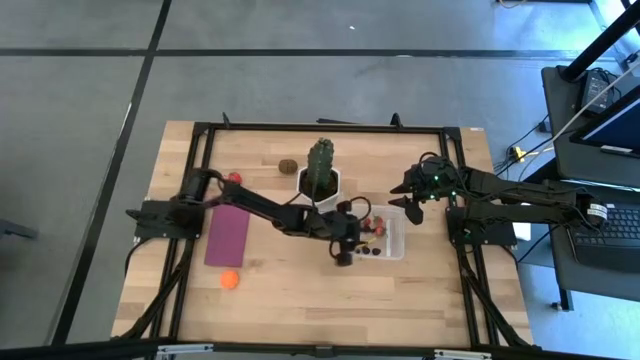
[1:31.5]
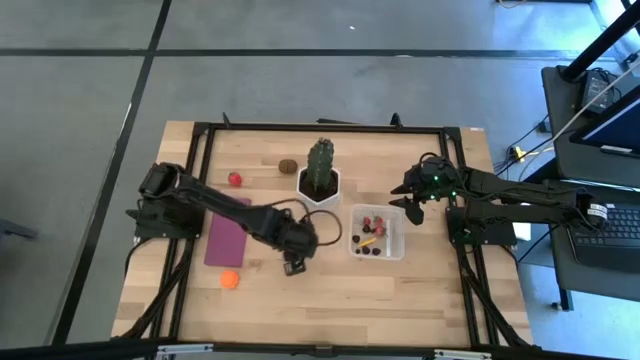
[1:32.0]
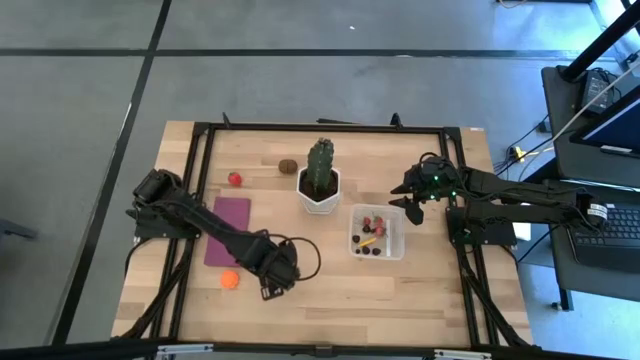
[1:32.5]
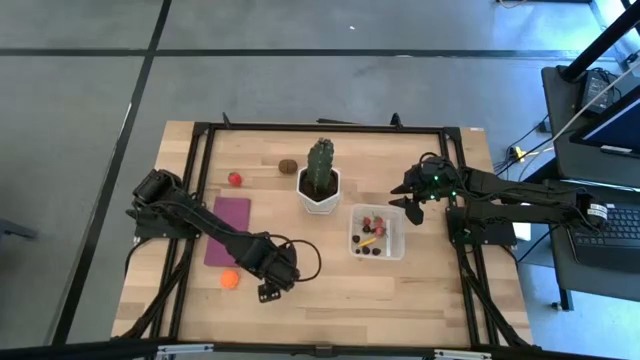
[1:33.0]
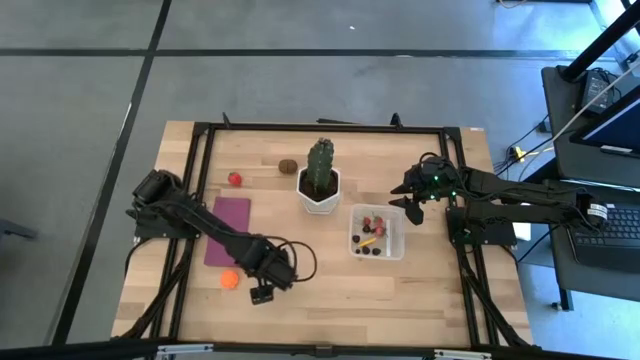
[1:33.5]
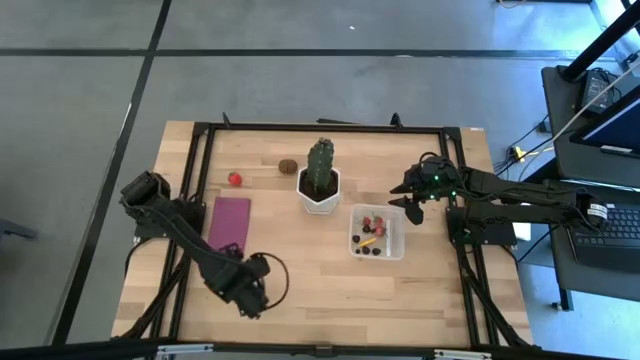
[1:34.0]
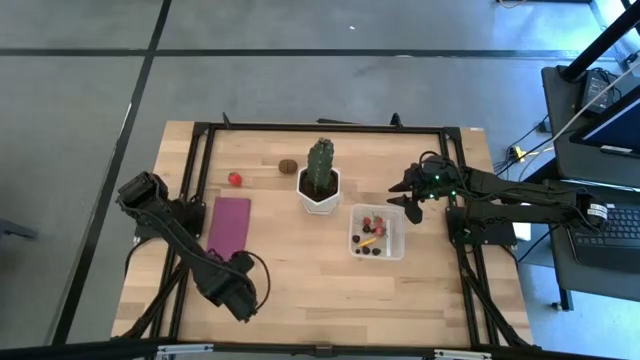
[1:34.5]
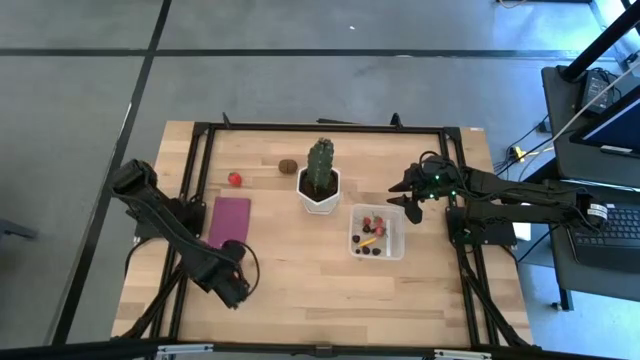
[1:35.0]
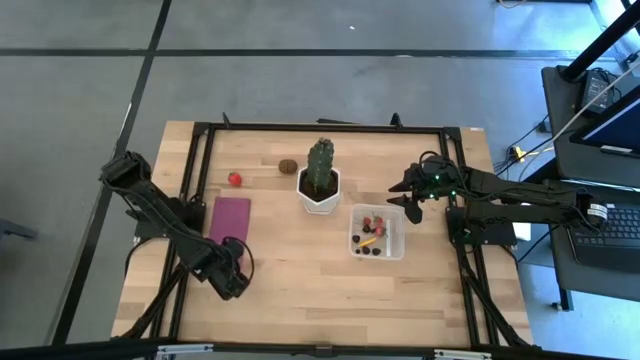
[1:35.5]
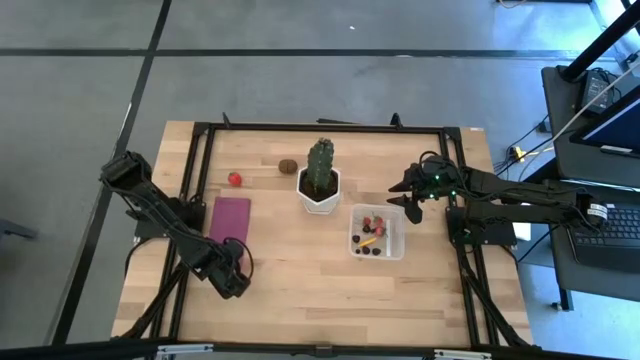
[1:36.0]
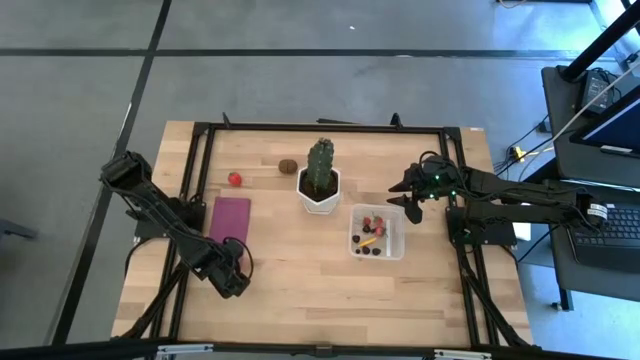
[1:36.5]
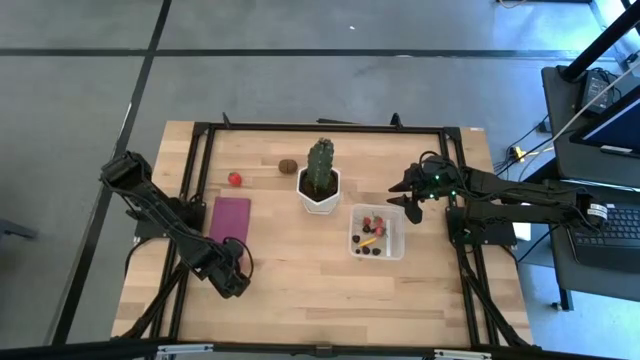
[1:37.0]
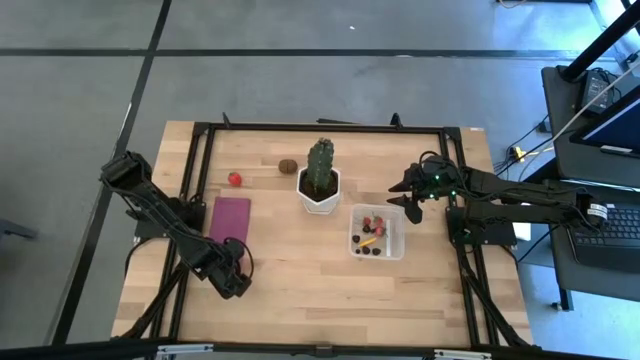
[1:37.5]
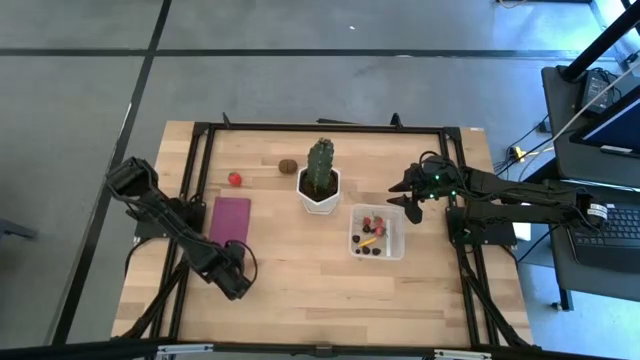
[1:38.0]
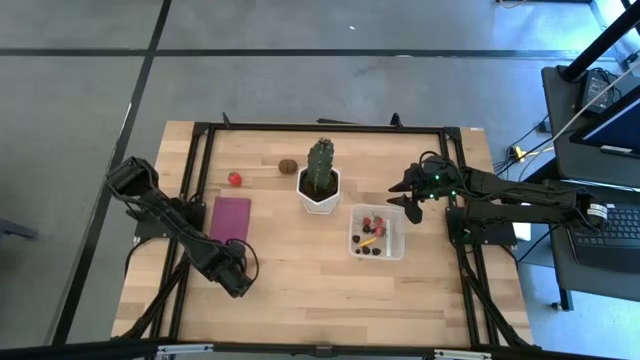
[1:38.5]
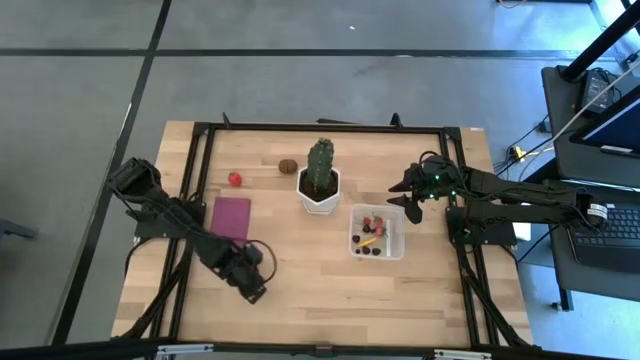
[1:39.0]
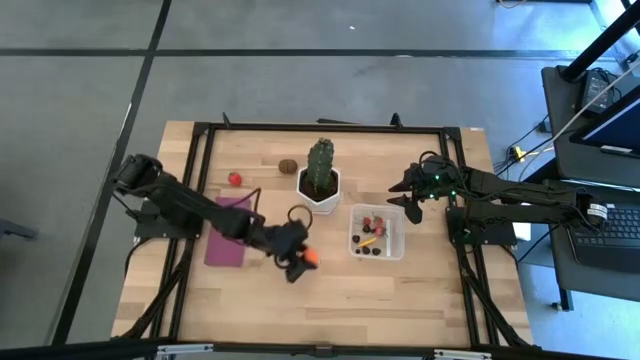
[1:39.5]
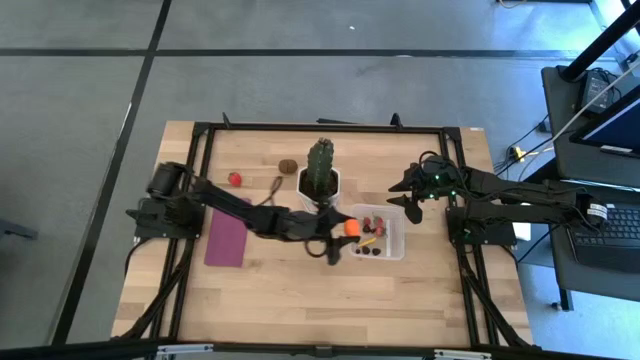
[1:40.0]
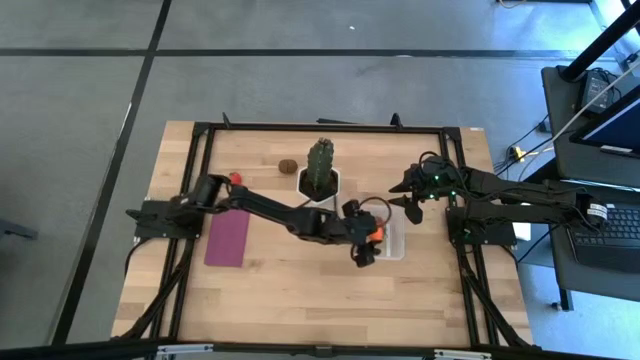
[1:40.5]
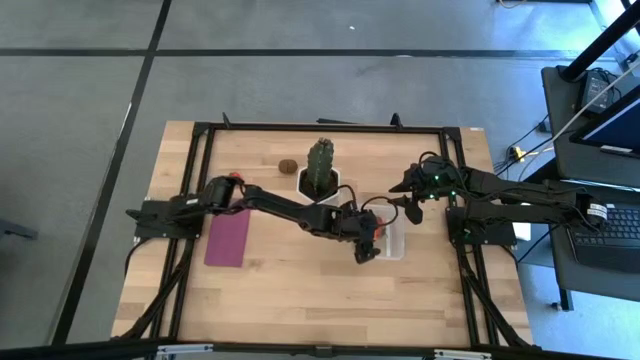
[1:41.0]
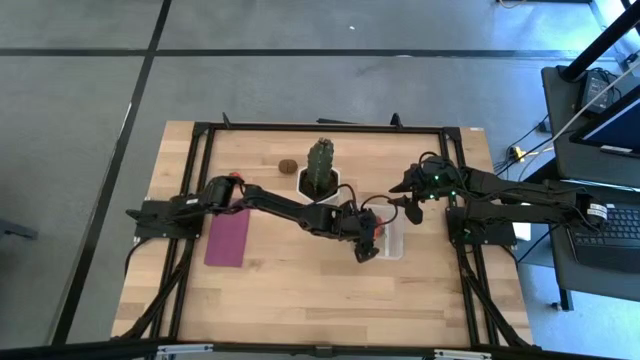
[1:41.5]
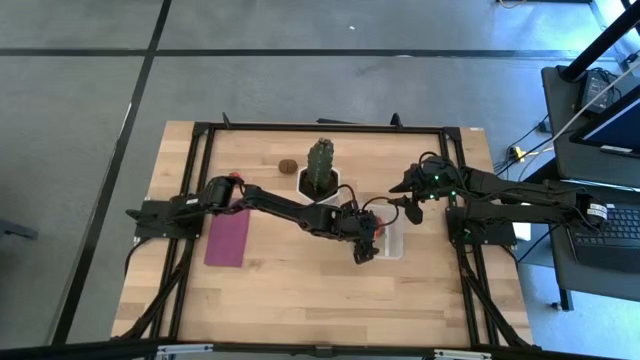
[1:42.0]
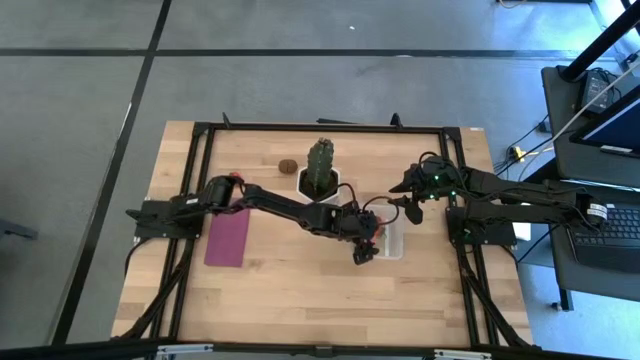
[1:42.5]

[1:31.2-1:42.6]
Task: Pick and placing Produce into tupperware
Put the pumpkin into the transparent bin

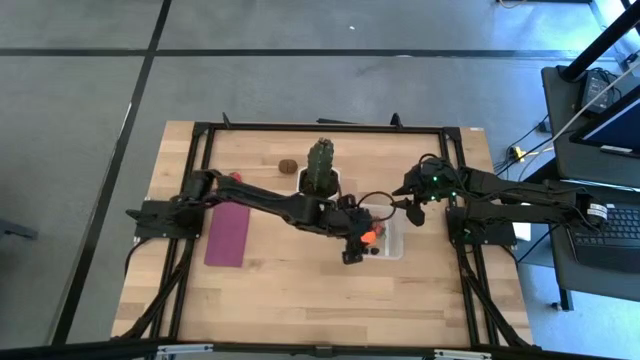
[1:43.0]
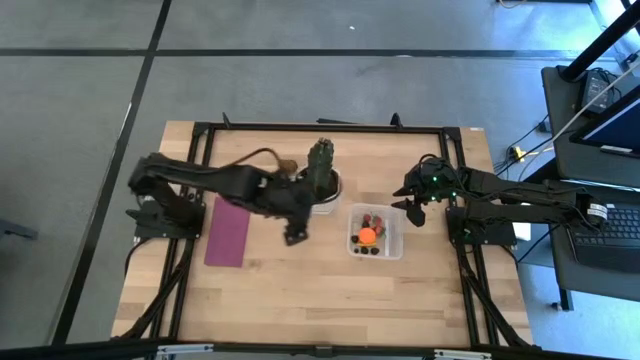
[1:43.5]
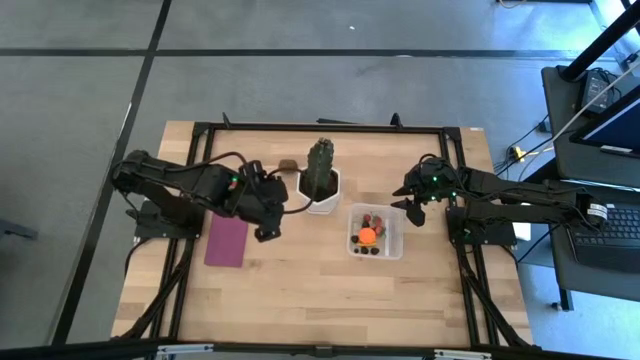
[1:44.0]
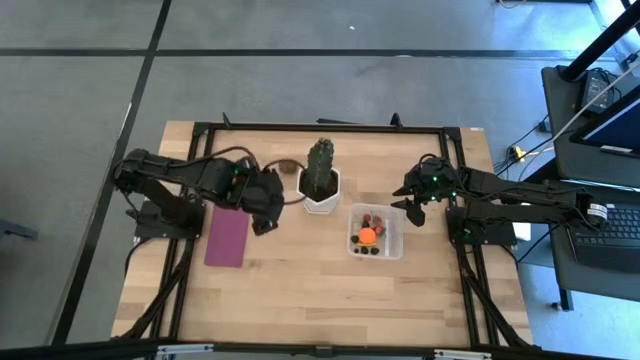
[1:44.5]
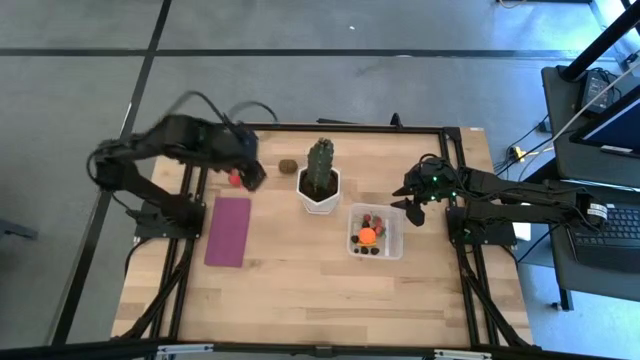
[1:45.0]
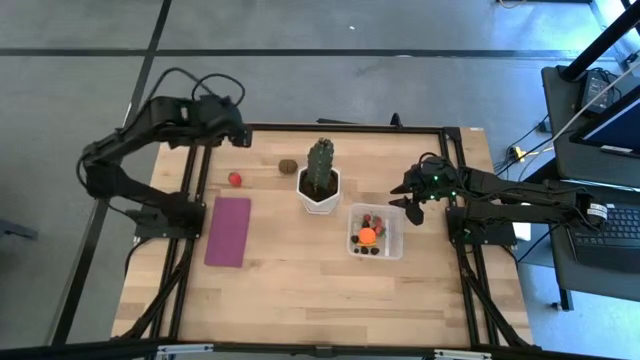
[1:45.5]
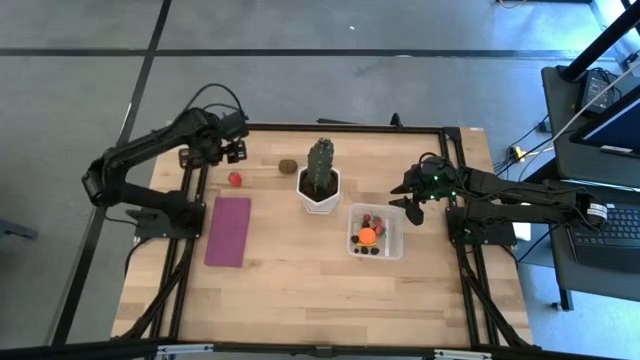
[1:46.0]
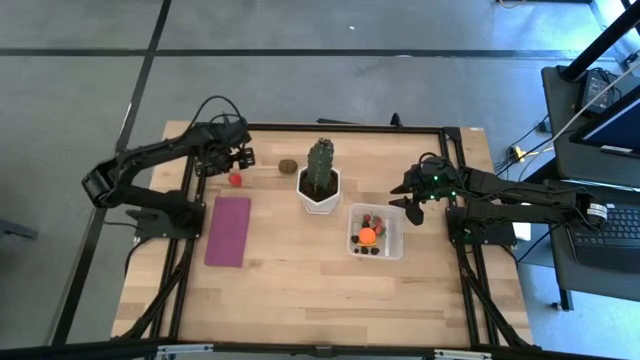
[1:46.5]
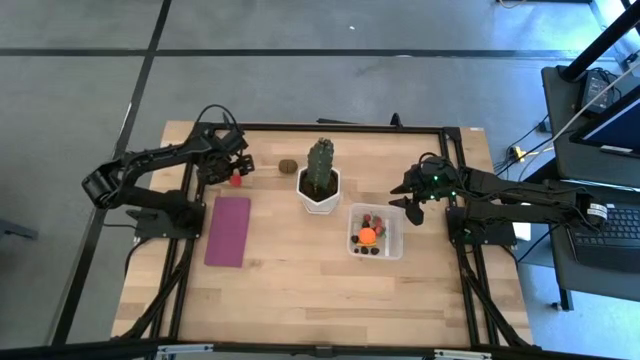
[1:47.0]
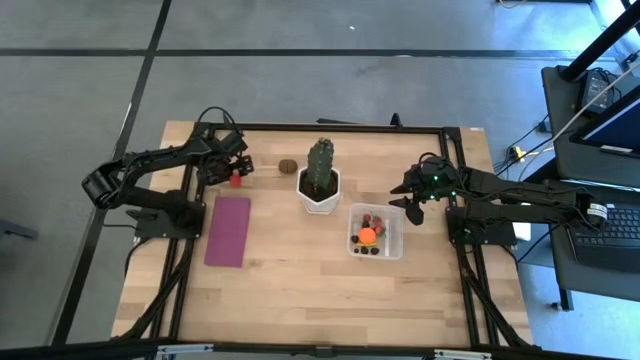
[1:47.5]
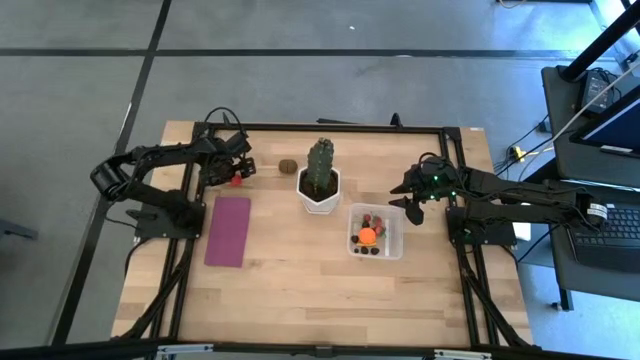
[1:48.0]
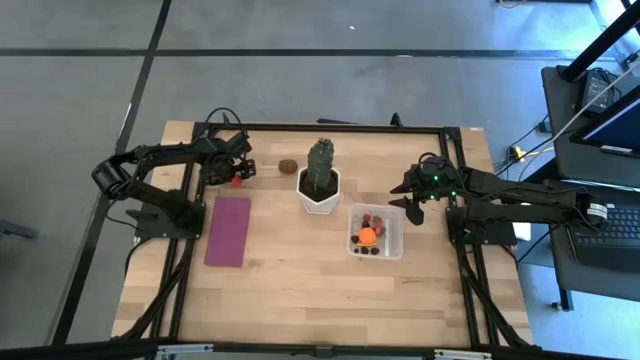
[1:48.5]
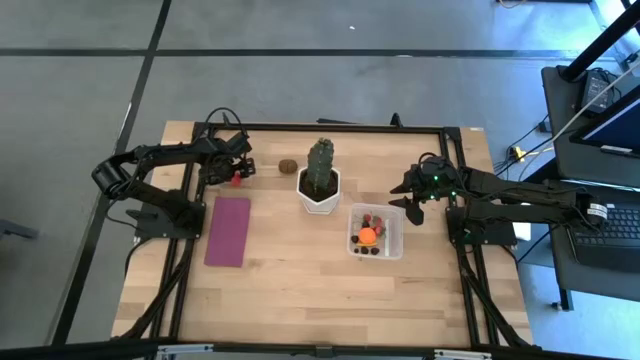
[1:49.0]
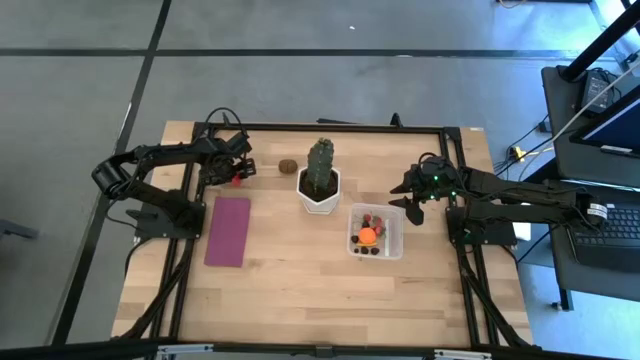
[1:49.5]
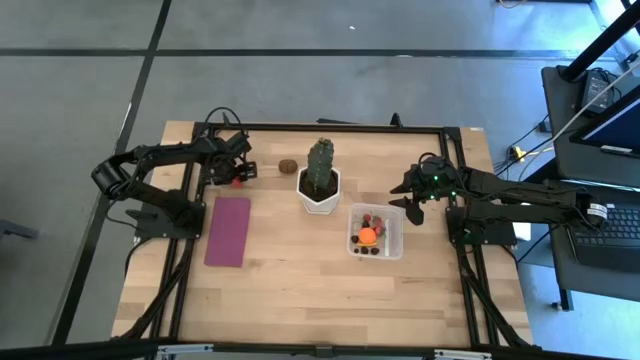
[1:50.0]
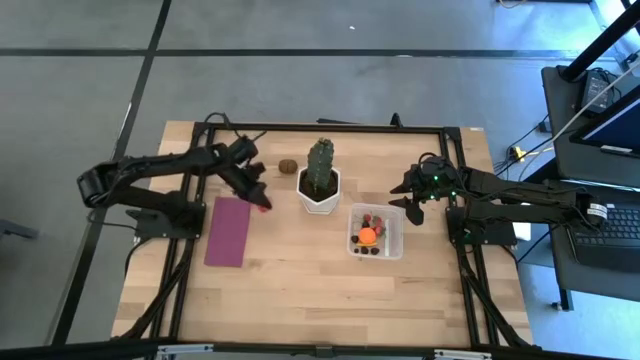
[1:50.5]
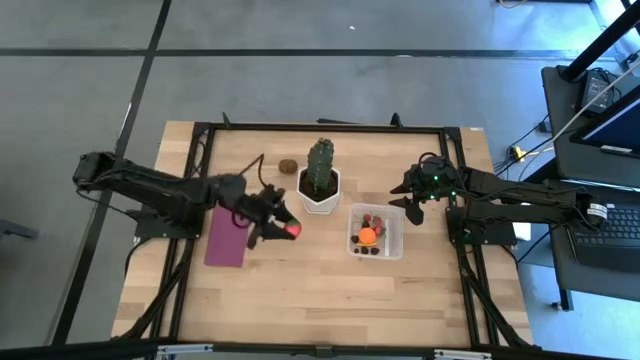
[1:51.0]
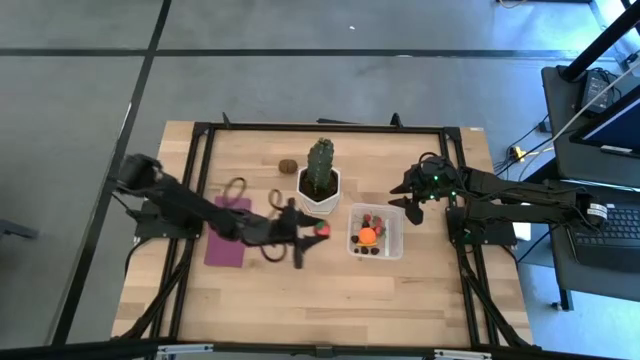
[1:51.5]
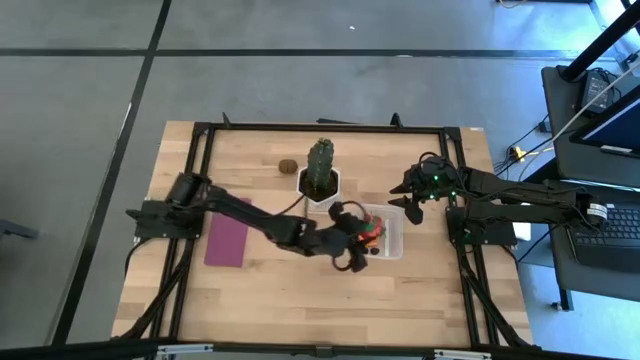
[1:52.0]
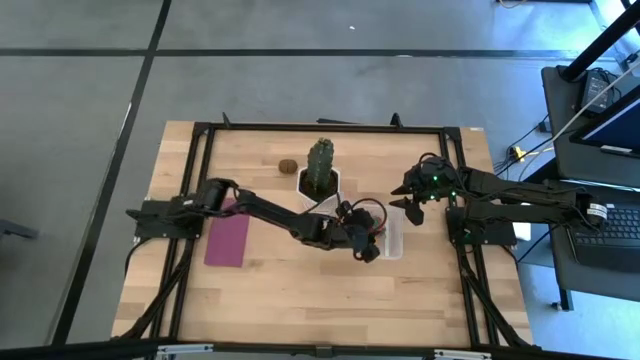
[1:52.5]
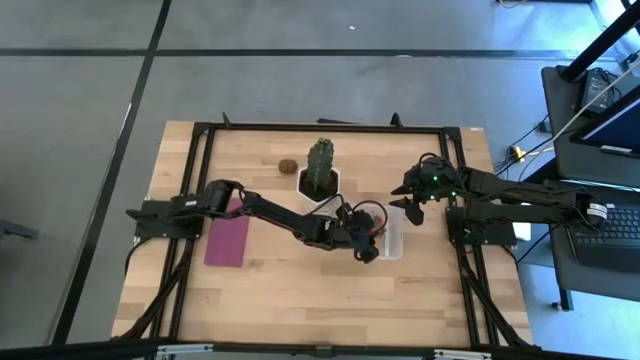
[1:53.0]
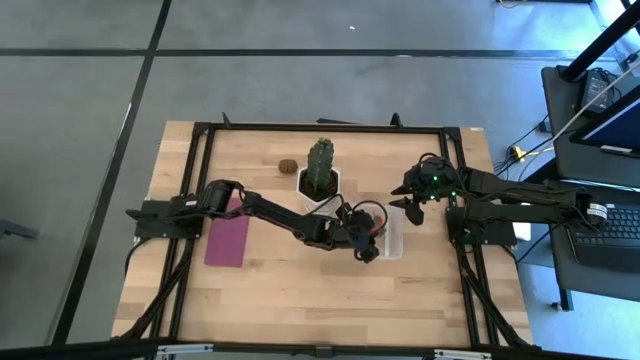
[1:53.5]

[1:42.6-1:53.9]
Put the strawberry into the transparent bin

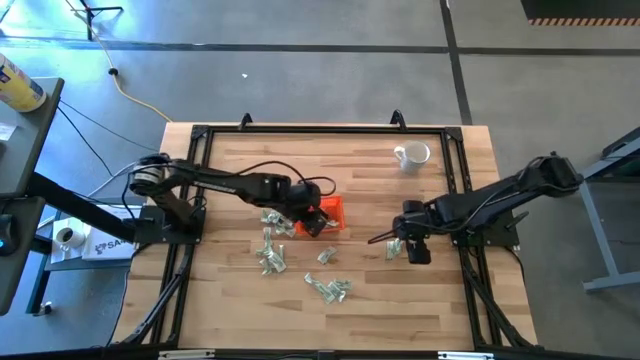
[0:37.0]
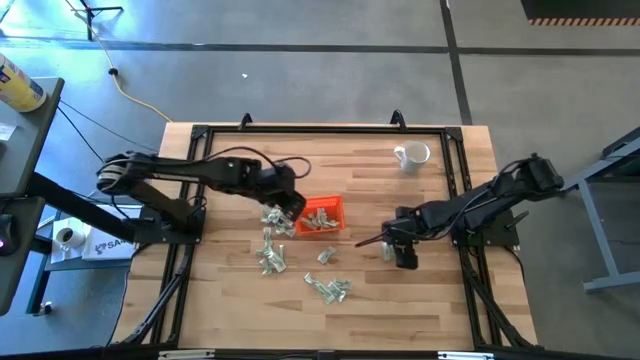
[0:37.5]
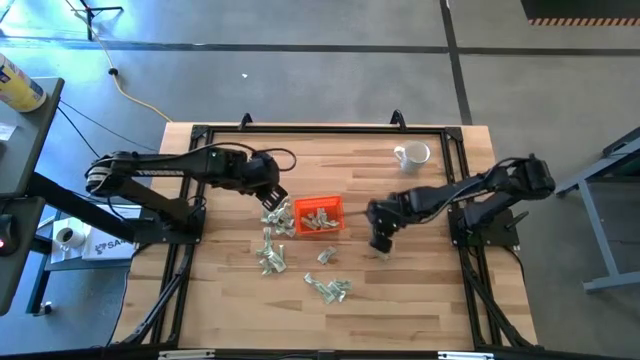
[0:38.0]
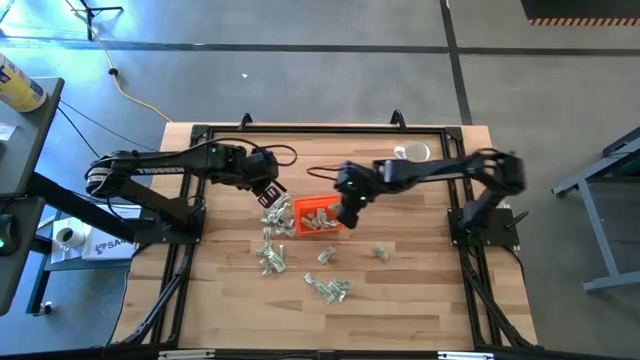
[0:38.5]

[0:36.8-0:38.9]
Task: Pick and place Stevia / Truvia into bins
Put the stevia packet into the orange bin
